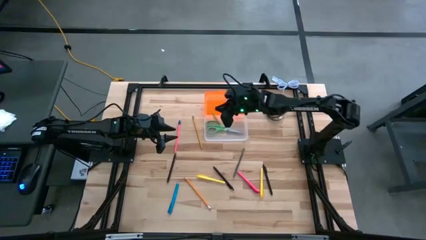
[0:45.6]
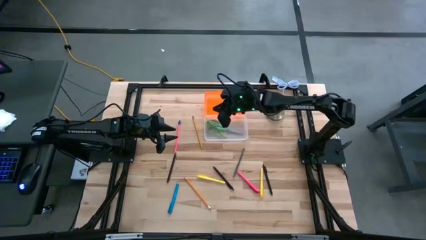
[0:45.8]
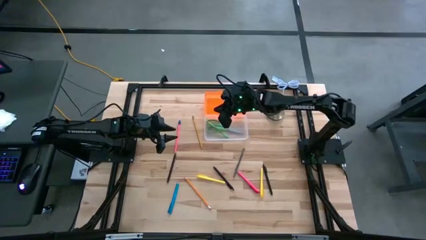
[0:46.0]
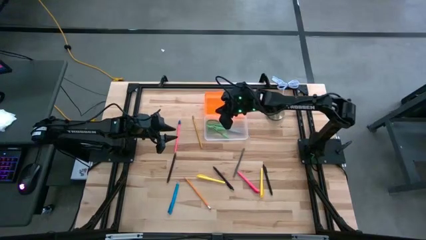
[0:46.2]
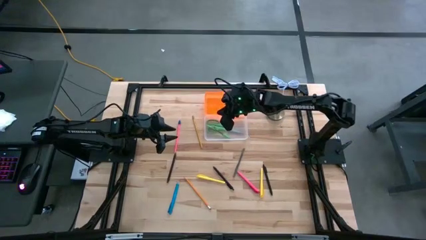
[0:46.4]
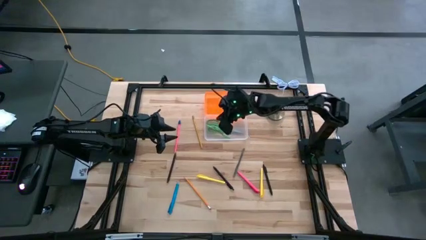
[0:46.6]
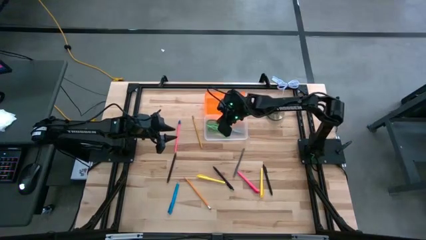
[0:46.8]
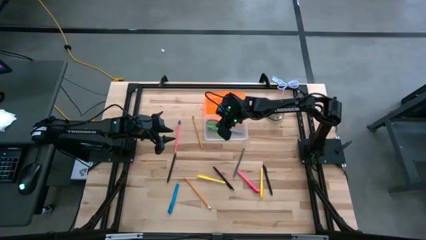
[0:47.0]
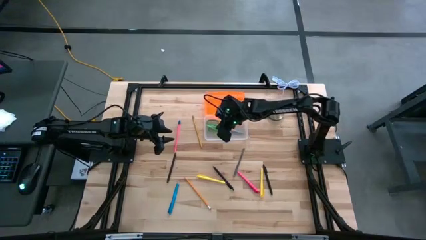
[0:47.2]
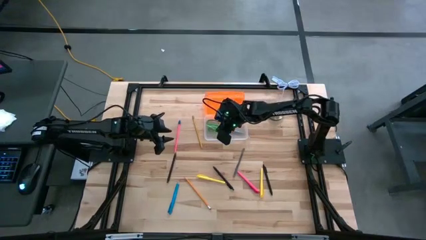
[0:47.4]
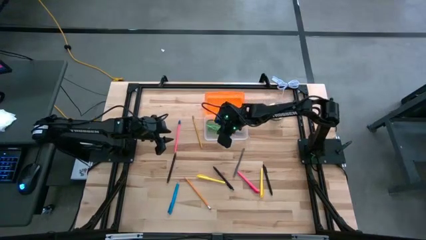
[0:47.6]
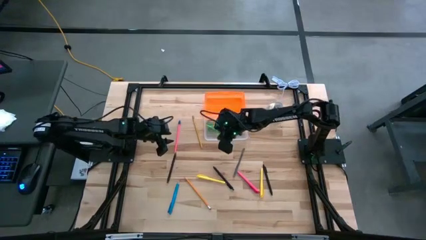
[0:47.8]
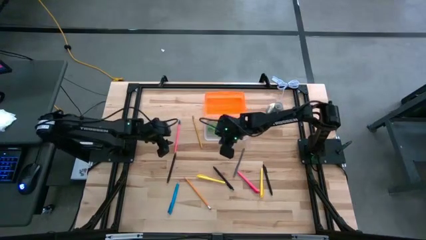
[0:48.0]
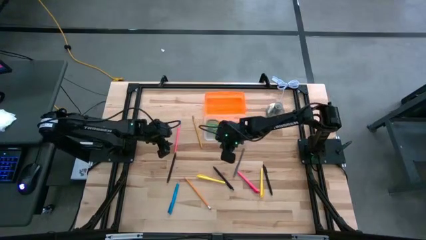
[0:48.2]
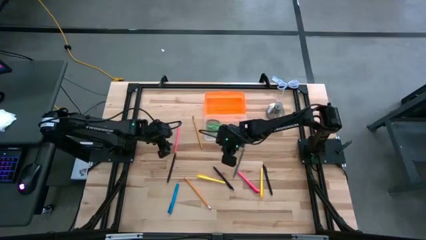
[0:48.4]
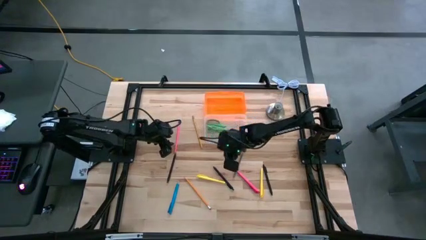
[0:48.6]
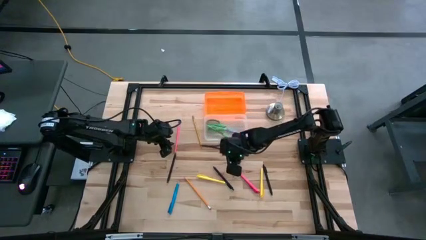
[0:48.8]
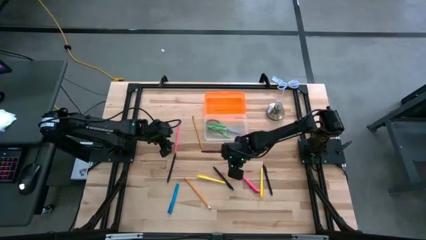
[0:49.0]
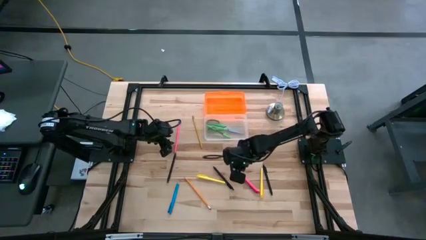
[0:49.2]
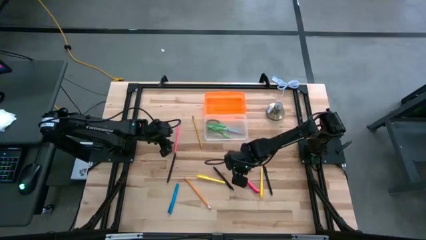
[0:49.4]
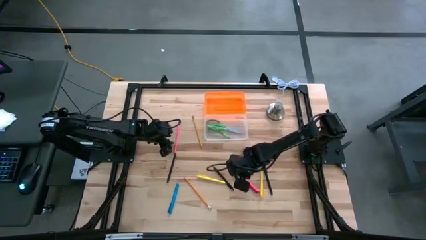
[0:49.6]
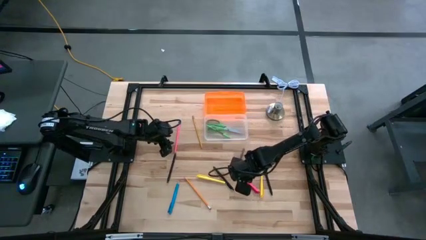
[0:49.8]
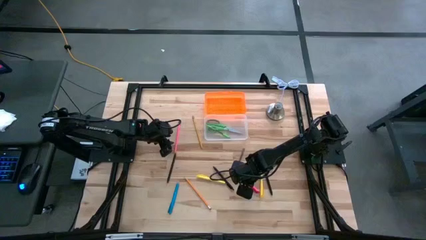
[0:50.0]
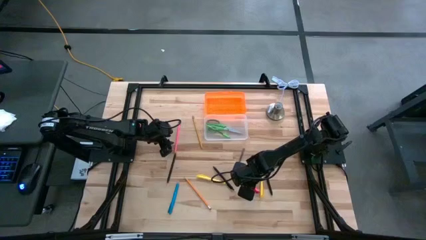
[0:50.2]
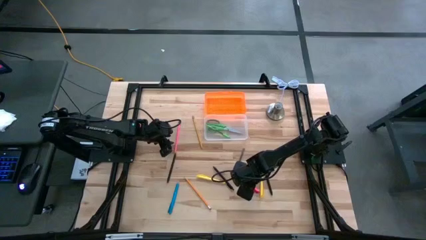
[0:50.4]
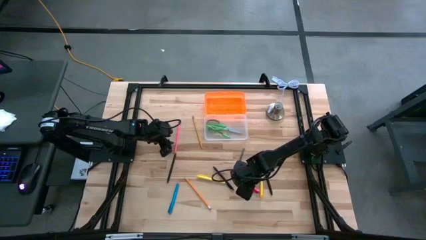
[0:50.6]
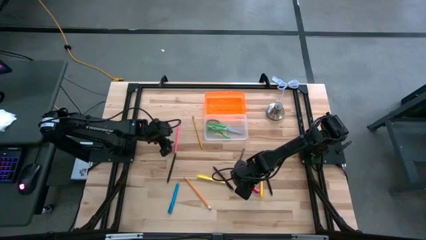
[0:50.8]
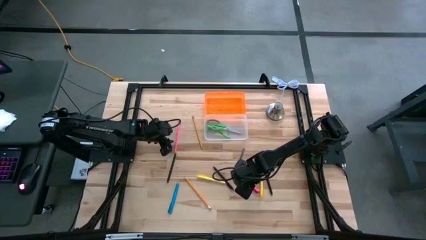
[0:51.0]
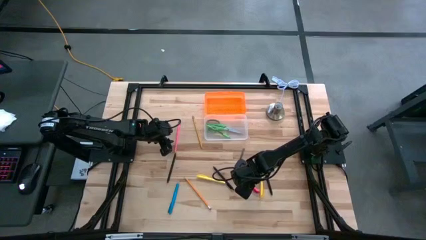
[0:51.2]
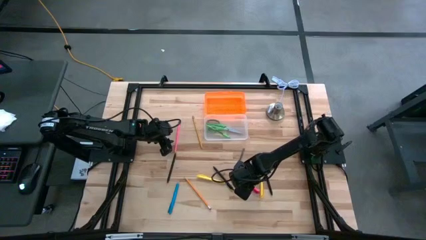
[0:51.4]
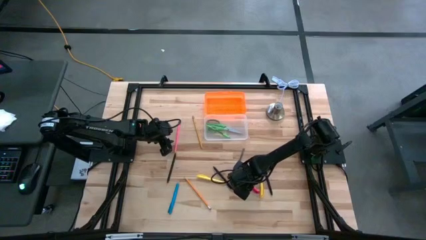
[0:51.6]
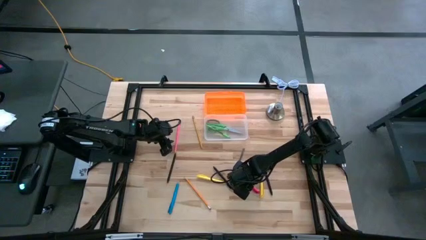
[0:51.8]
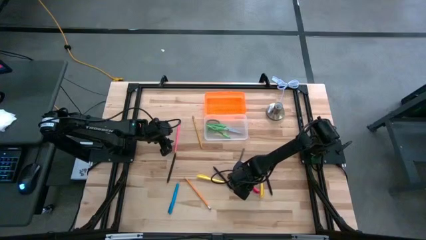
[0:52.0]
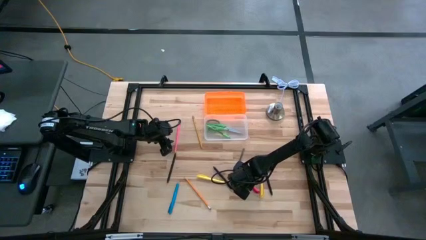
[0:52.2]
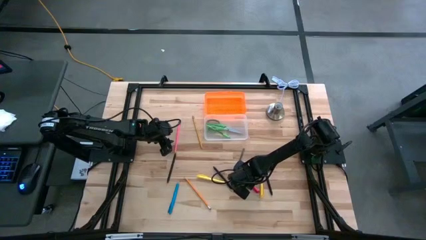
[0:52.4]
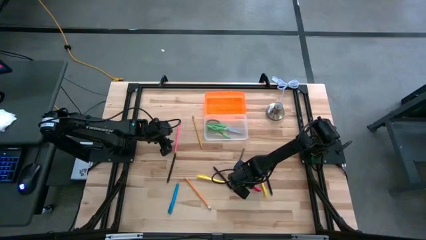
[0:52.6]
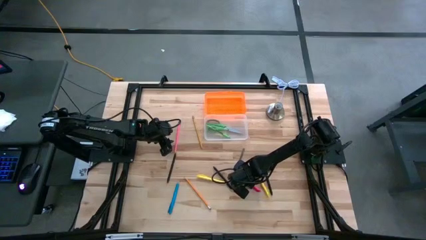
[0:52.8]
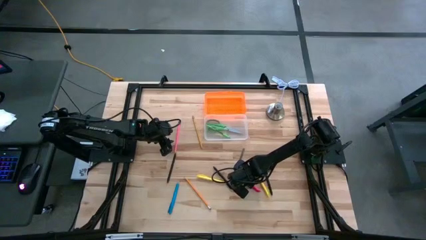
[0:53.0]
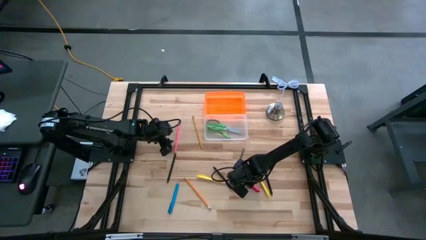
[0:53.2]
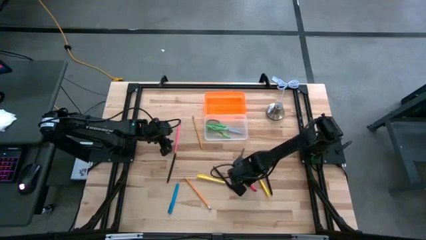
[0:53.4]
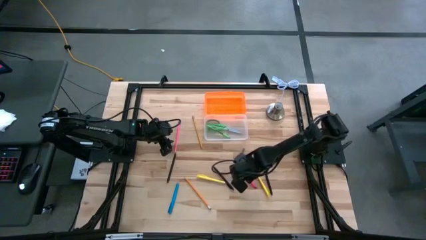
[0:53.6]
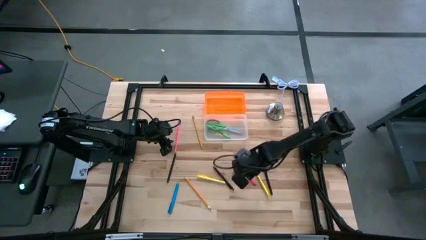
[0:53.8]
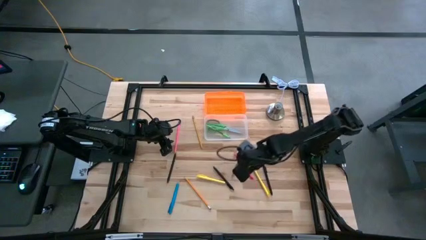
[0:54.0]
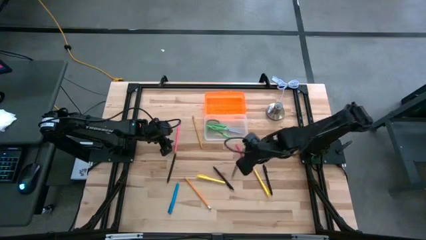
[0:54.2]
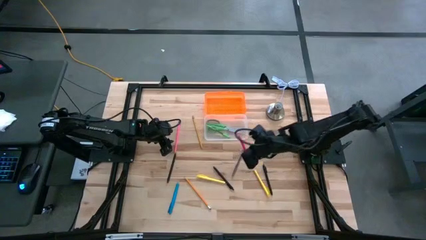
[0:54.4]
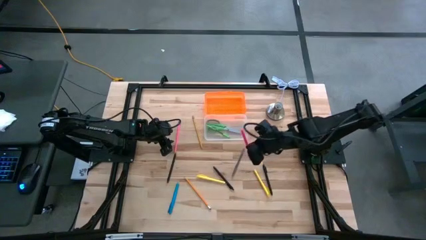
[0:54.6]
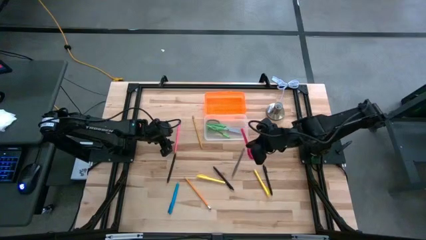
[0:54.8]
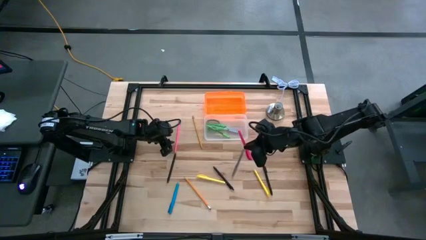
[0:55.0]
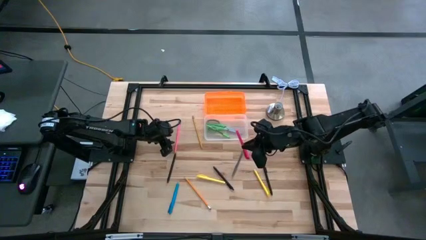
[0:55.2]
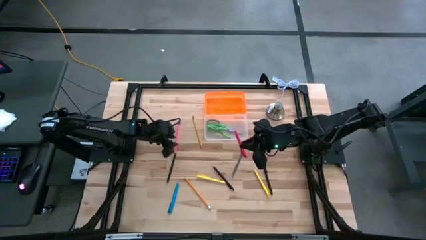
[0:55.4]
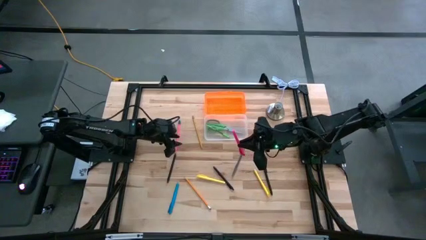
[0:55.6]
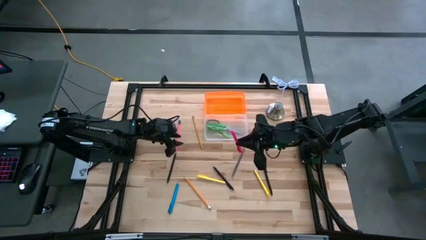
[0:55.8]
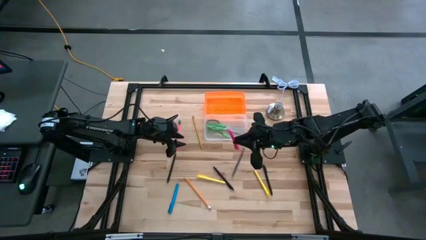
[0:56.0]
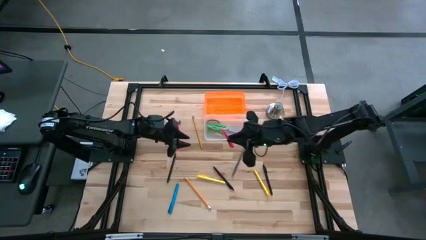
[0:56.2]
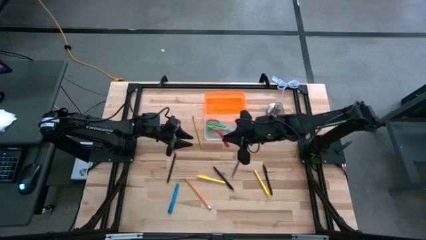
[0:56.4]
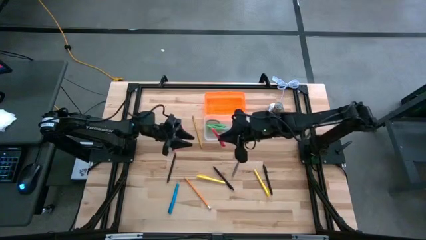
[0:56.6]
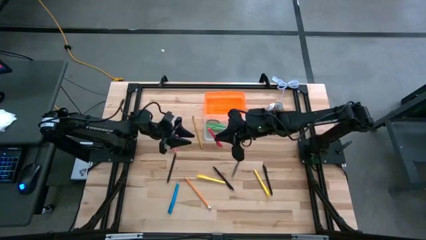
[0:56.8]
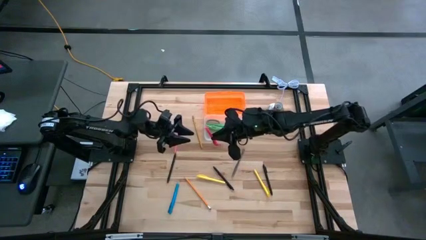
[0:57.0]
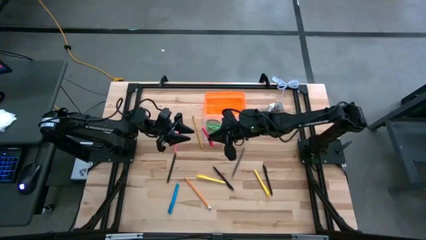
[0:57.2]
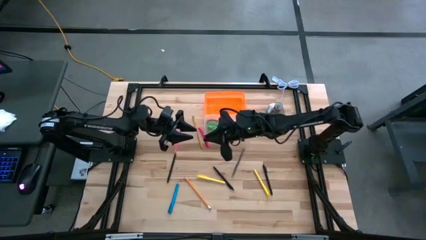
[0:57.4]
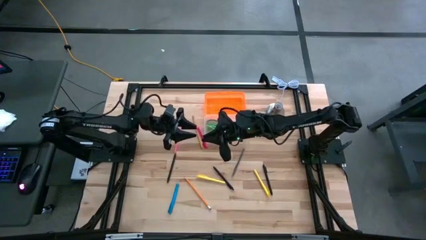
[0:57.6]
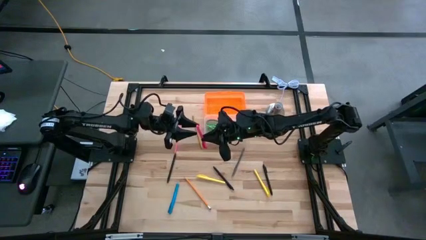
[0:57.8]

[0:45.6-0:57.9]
Task: Pick & place school supplies into a supply box
Put the pink highlighter into the supply box

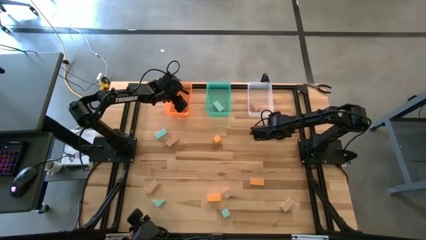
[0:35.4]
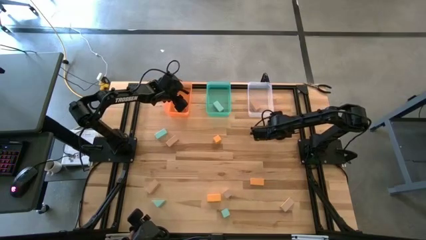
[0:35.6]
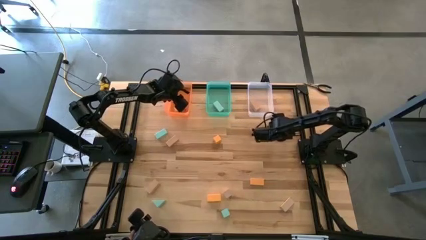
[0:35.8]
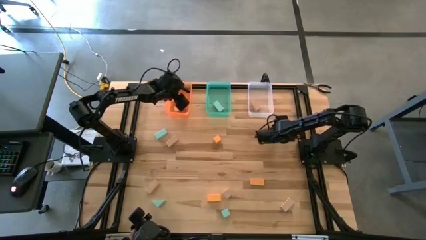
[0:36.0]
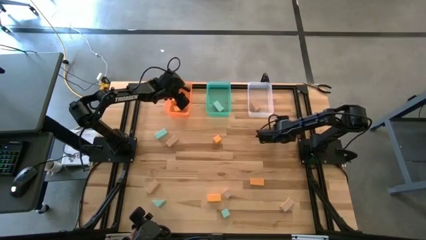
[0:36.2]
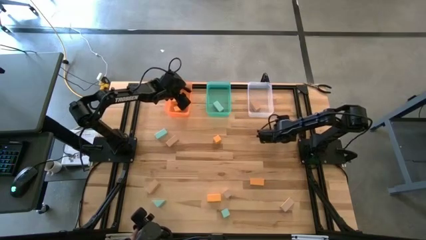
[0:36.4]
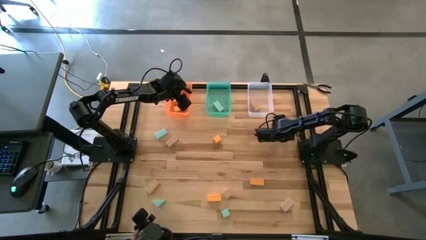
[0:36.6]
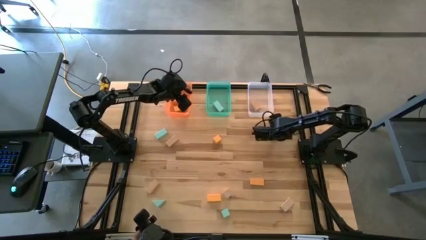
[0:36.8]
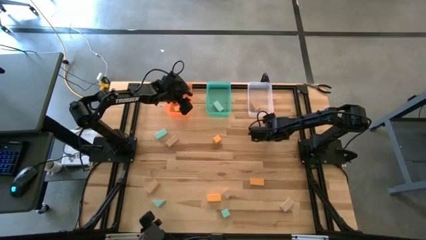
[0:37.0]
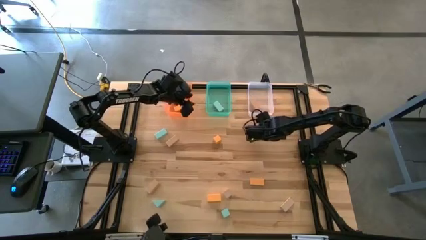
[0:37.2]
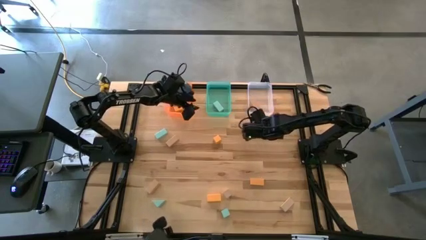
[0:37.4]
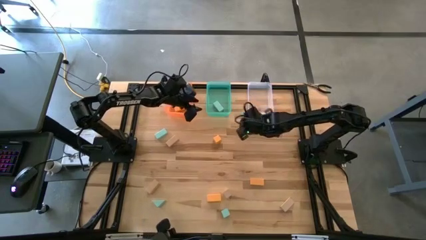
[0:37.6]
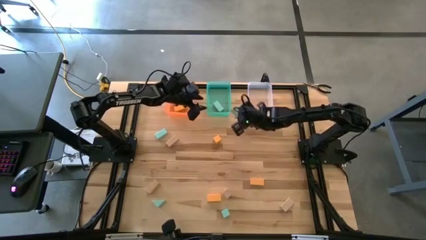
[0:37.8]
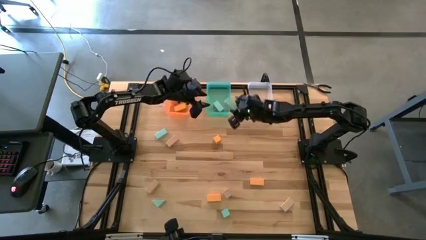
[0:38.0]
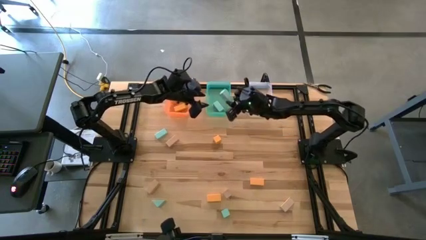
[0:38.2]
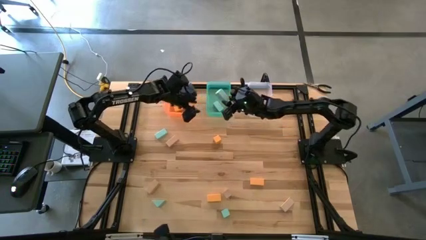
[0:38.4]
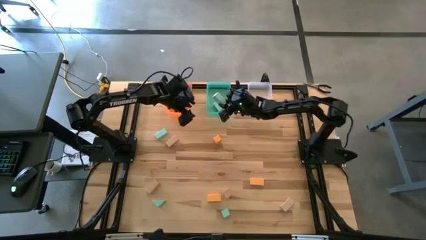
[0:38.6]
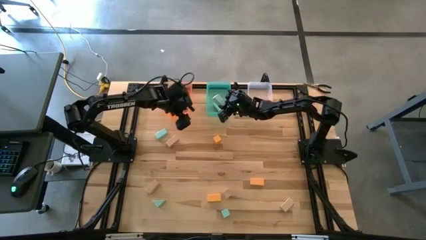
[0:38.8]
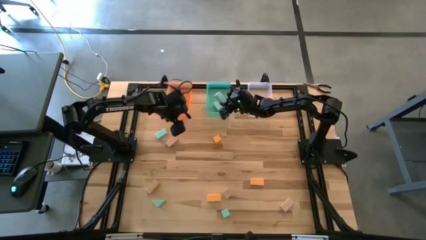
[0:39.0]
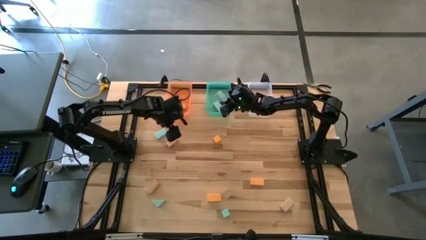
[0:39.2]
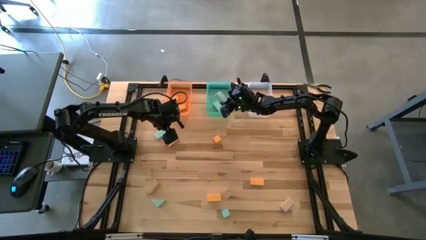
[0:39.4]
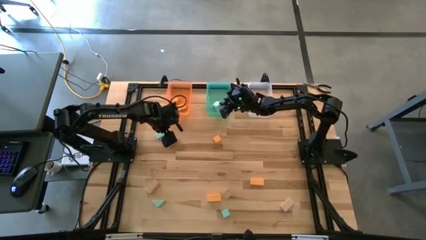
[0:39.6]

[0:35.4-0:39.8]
Task: Sort & place blocks by color
Put the blue block into the blue bin
